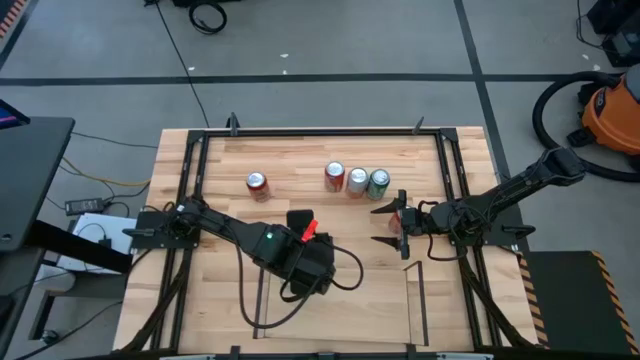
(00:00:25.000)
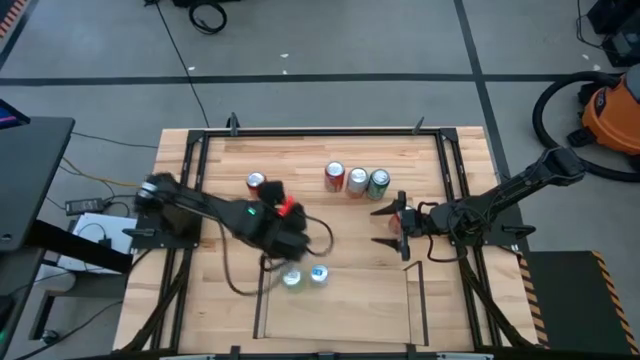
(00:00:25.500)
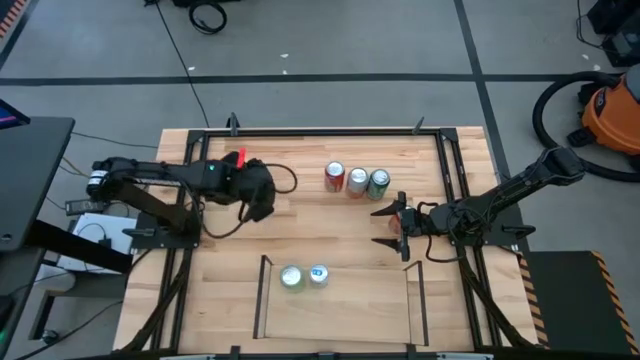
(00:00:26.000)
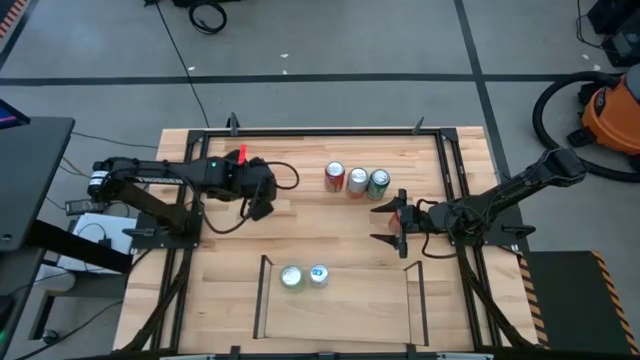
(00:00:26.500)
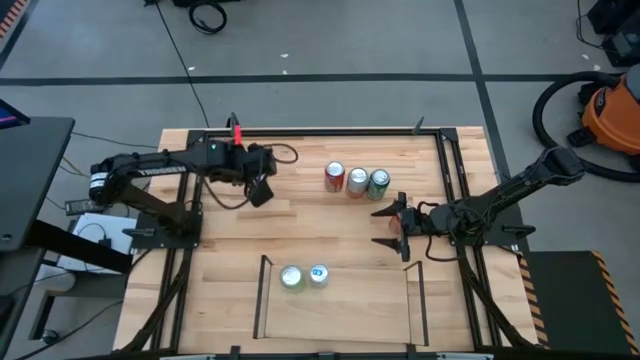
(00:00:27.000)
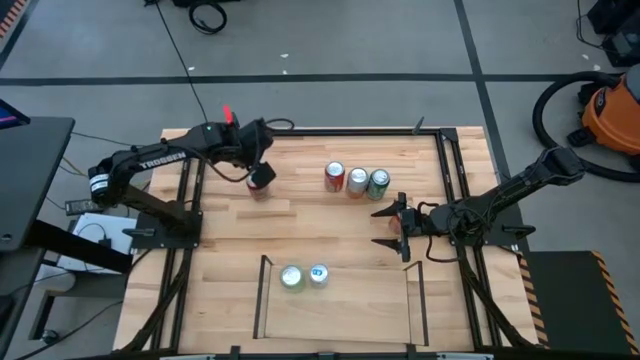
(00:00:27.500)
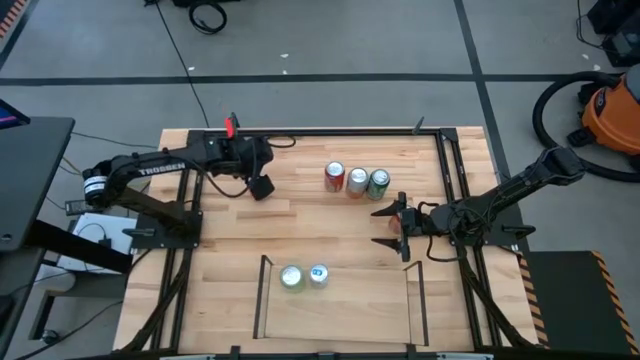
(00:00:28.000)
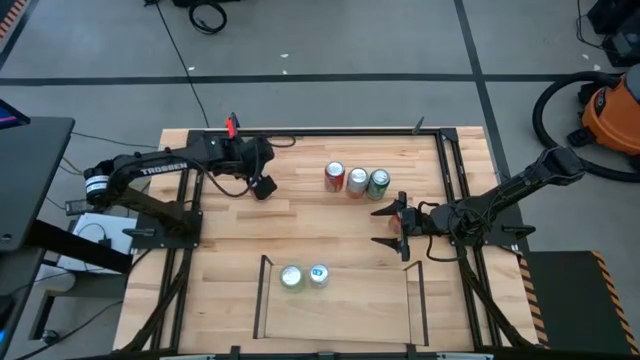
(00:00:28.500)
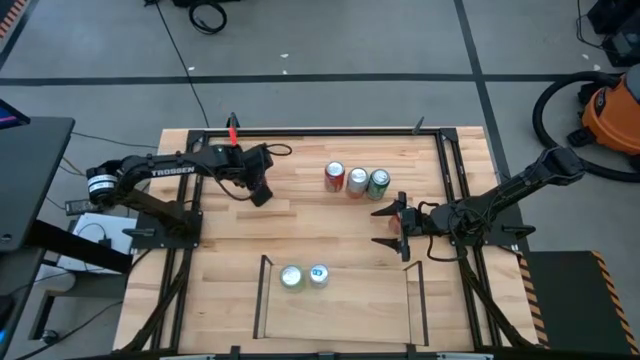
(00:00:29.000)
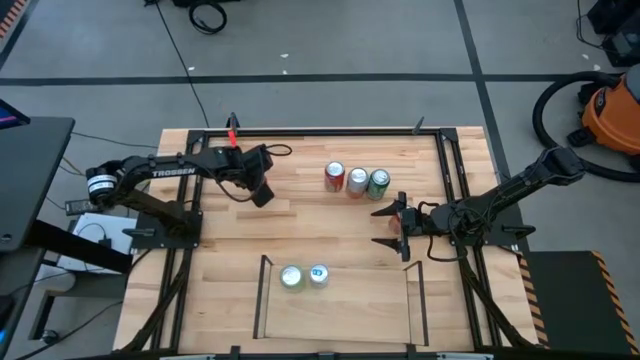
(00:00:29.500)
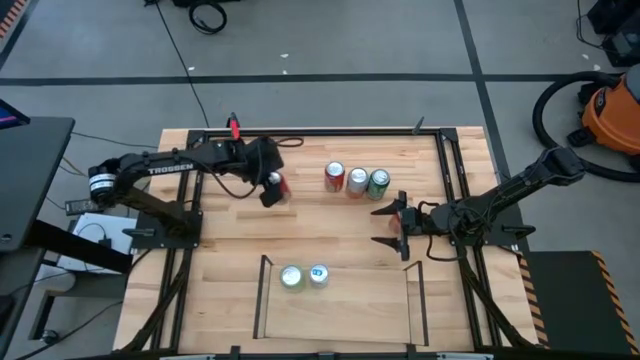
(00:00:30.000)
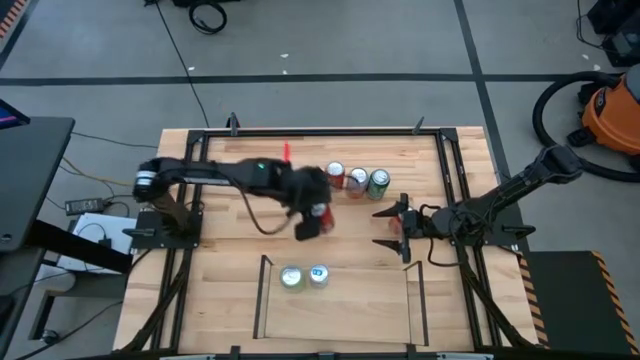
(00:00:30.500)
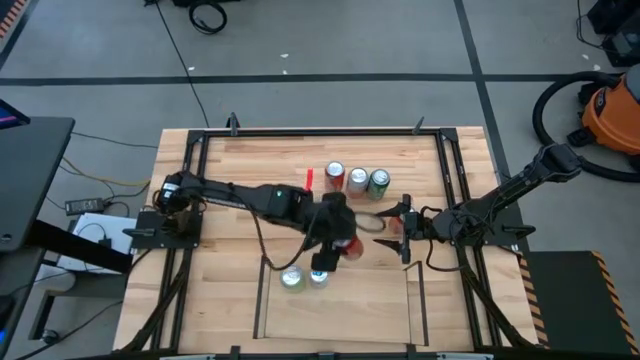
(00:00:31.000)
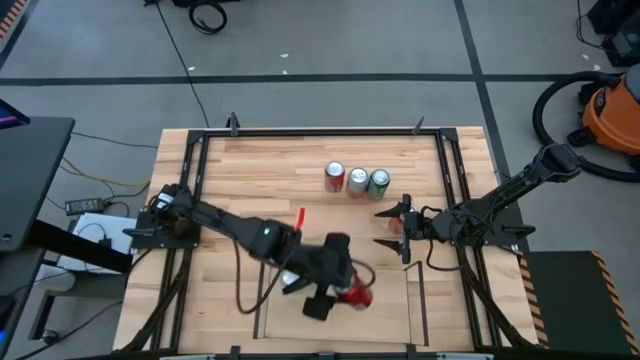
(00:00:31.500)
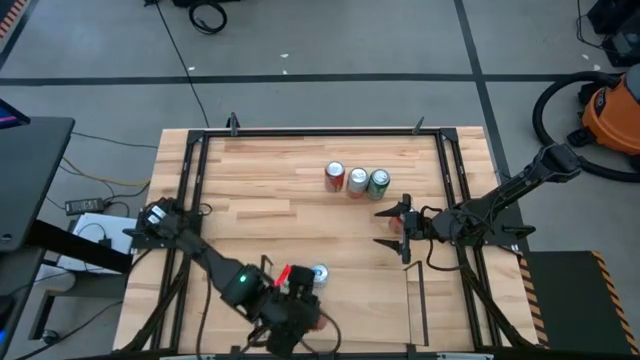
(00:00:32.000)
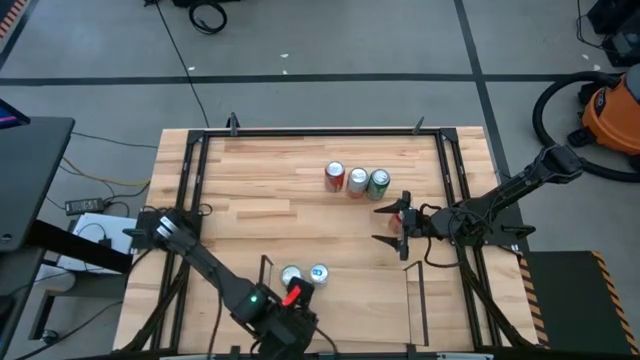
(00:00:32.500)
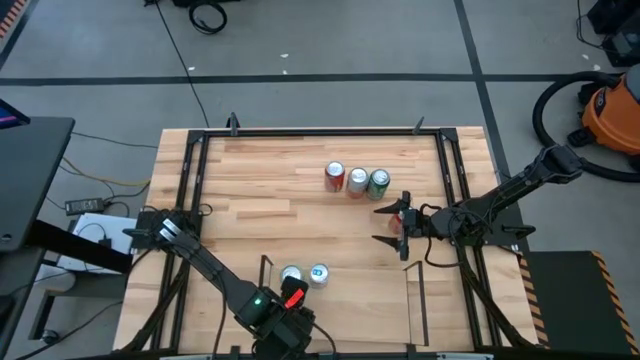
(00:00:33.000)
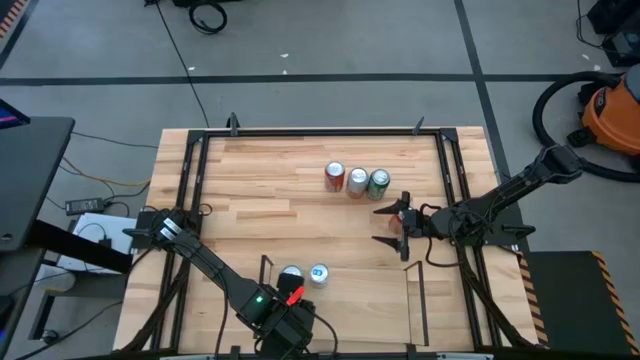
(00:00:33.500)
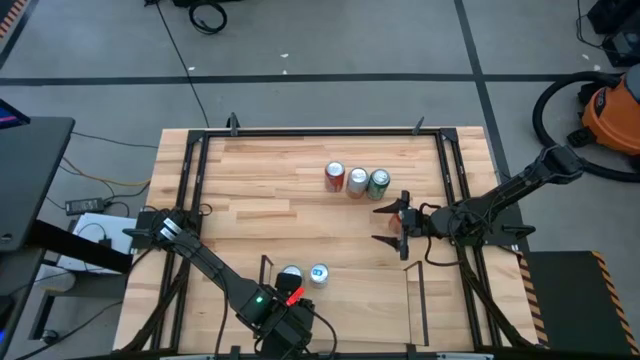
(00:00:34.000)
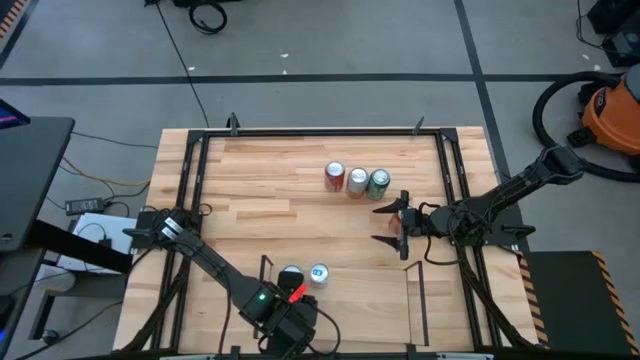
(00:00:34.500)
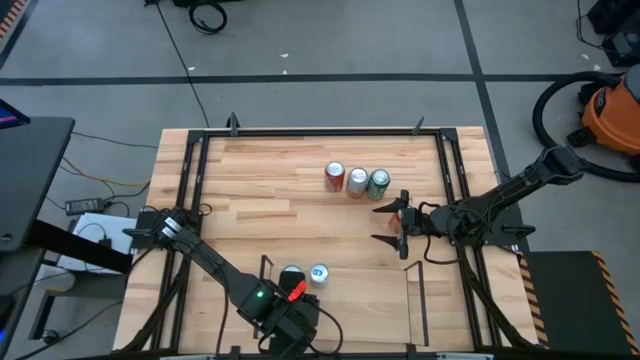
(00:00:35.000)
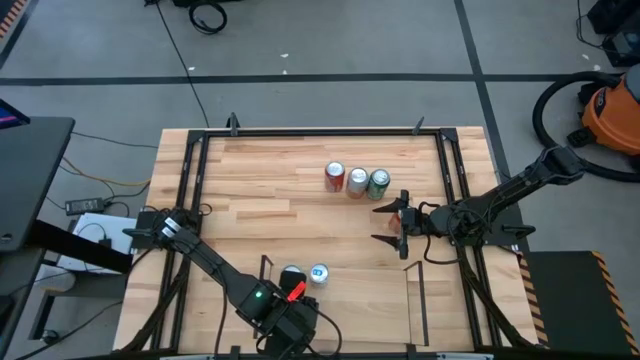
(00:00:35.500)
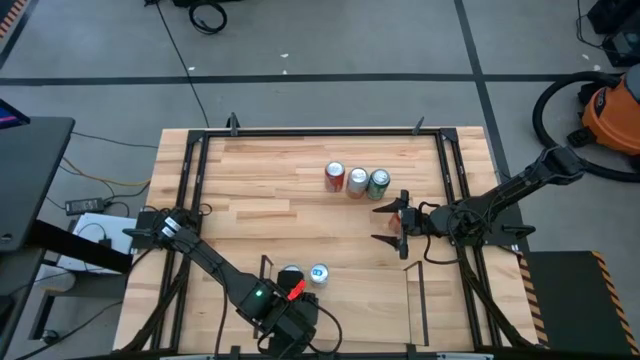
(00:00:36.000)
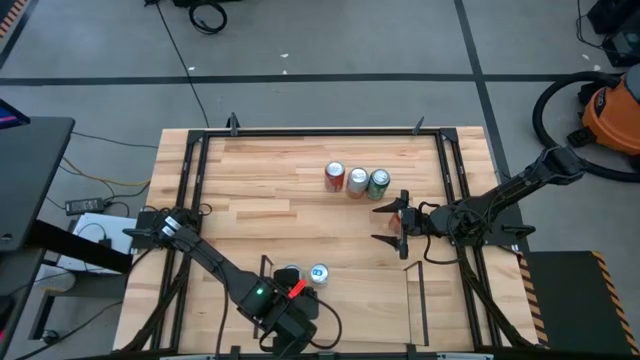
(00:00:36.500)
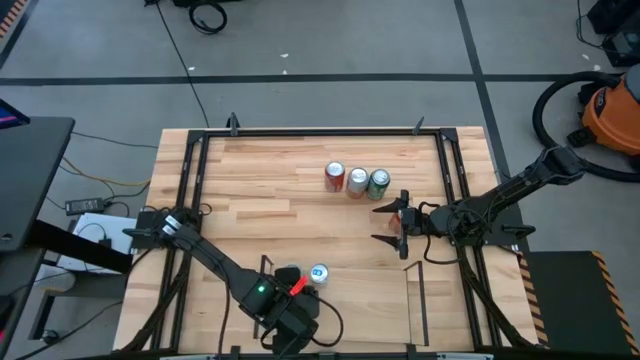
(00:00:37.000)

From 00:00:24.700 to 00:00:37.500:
Task: Place canned beverage on shelf
Put the red black soda can on the shelf

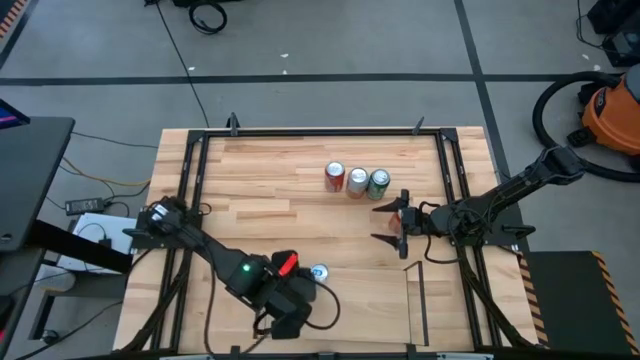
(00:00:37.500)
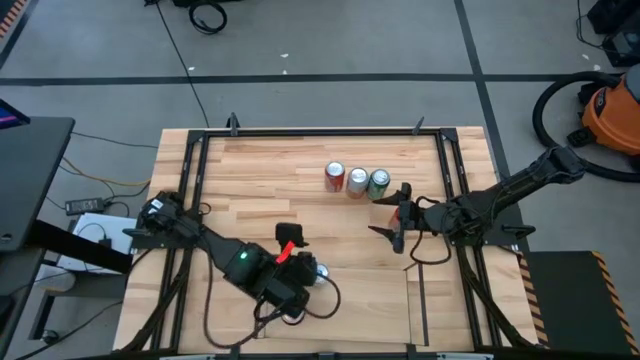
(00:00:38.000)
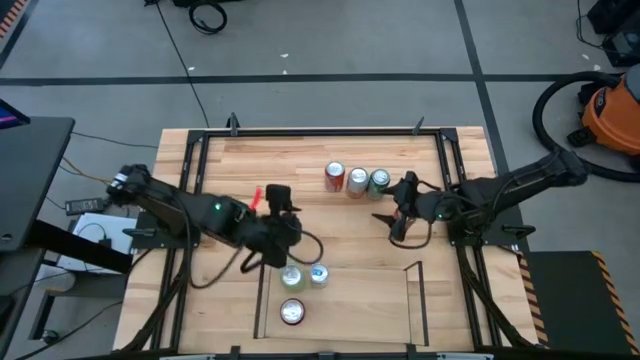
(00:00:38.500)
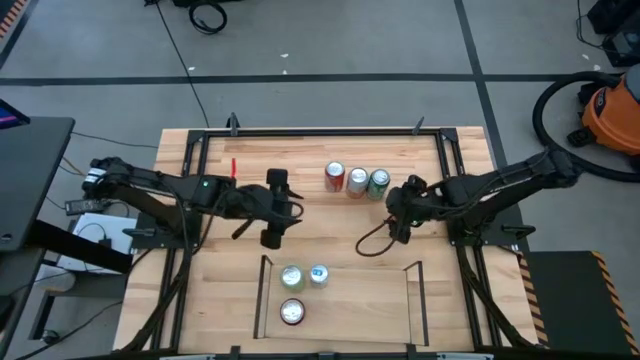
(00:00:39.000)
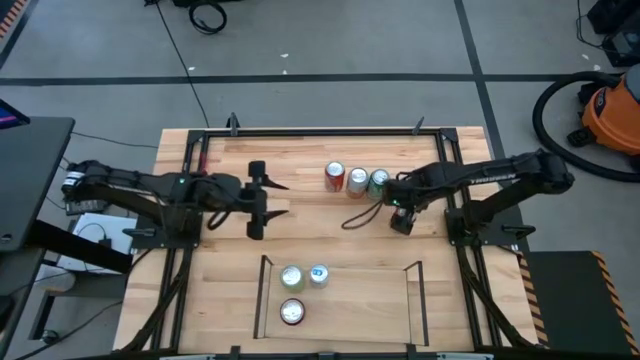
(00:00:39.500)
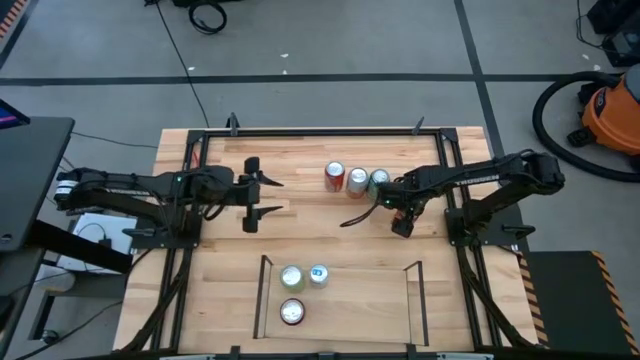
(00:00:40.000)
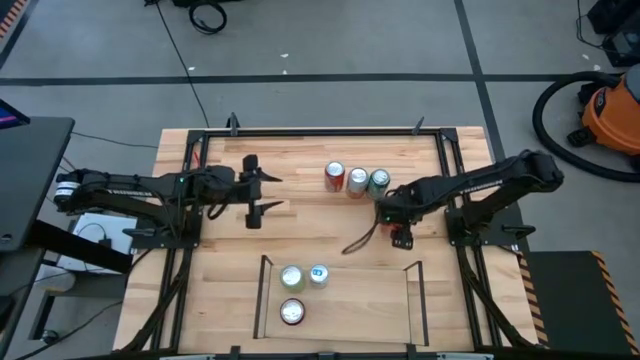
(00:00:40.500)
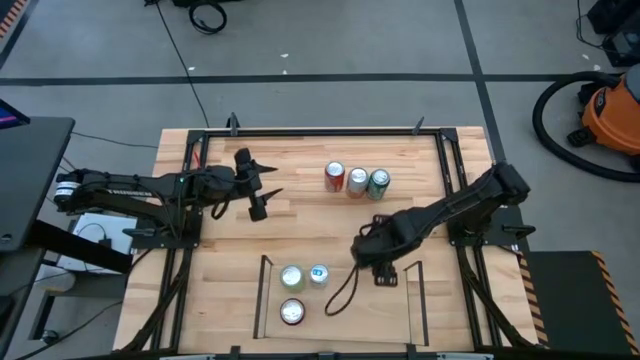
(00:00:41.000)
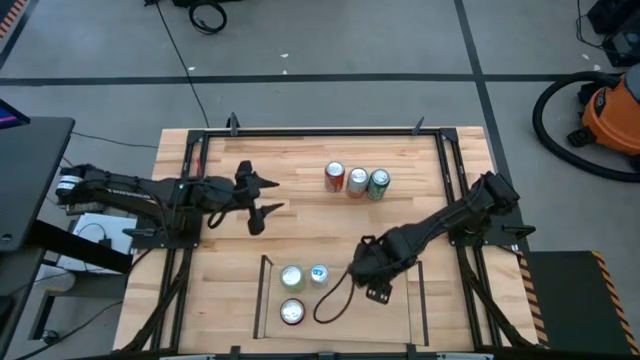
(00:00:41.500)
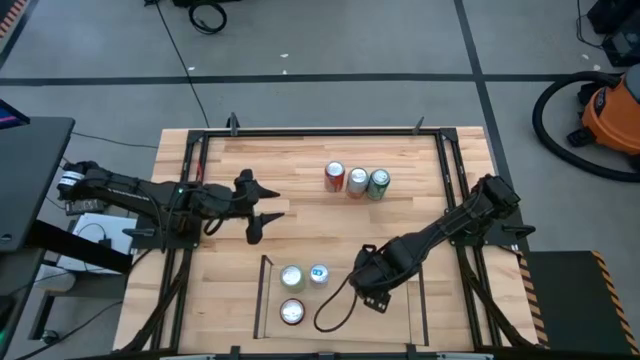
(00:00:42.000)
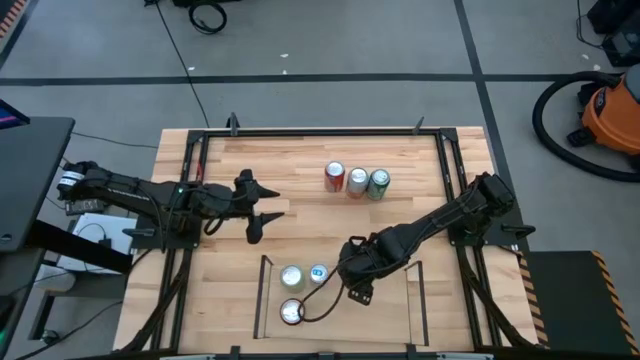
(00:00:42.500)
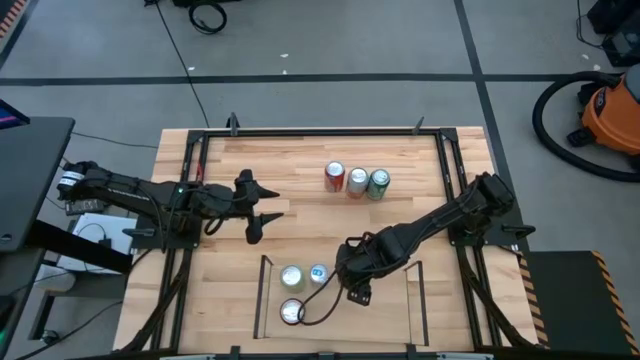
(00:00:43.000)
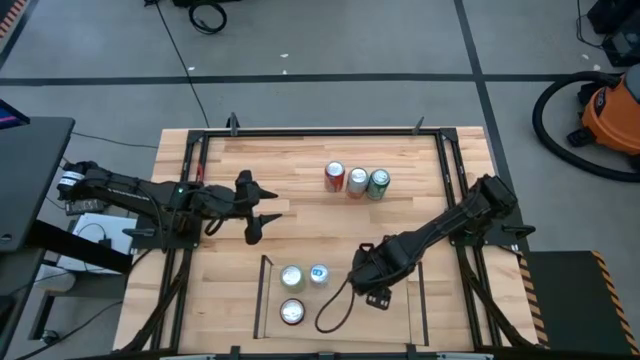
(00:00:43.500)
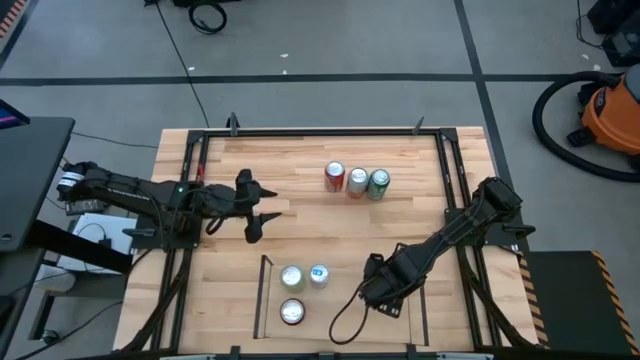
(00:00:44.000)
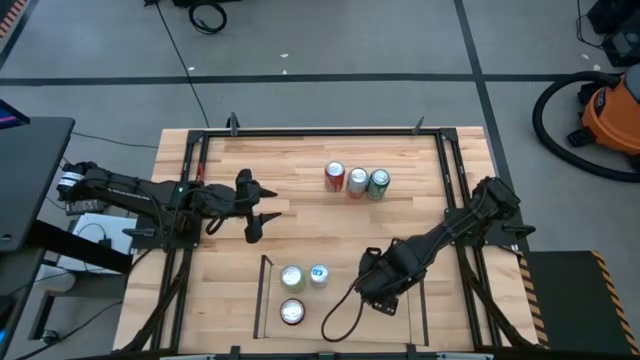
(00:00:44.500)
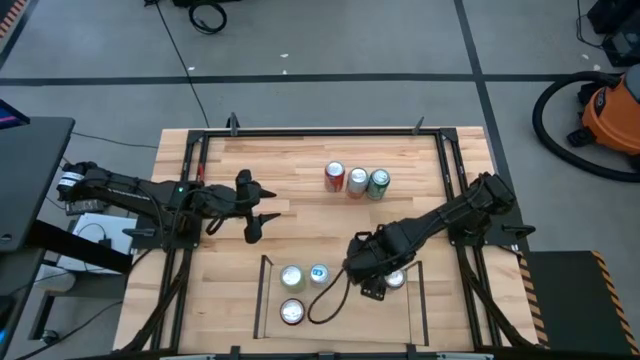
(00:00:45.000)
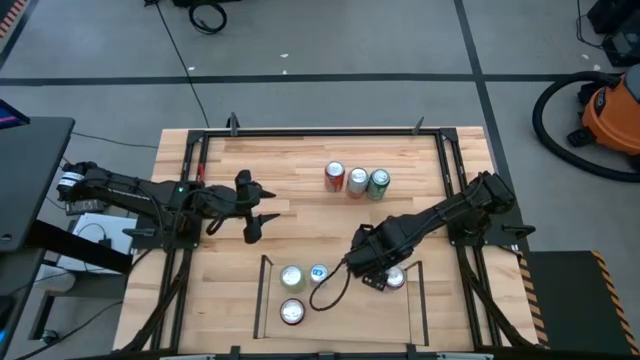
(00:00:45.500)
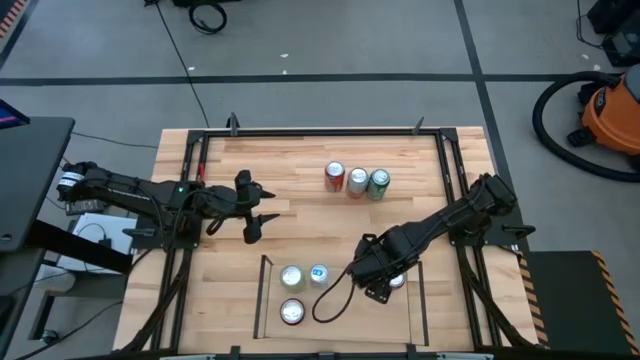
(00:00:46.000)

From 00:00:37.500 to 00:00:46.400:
Put the right orange soda can on the shelf
